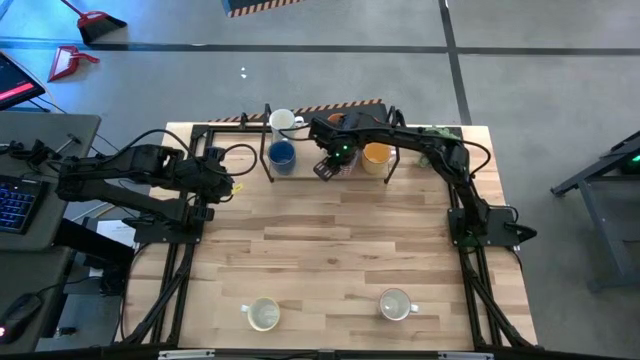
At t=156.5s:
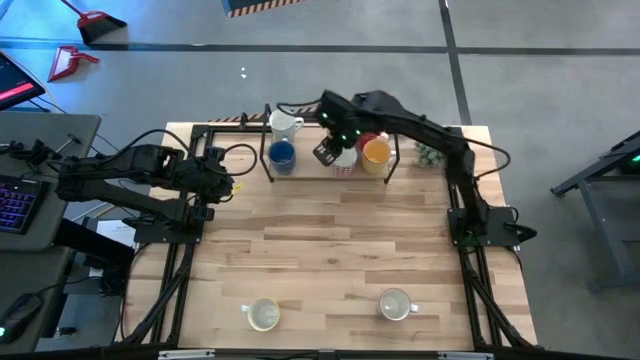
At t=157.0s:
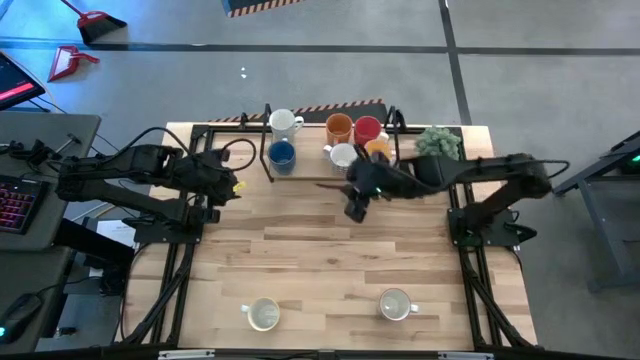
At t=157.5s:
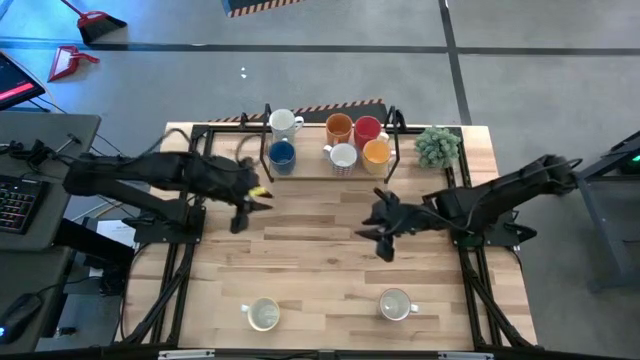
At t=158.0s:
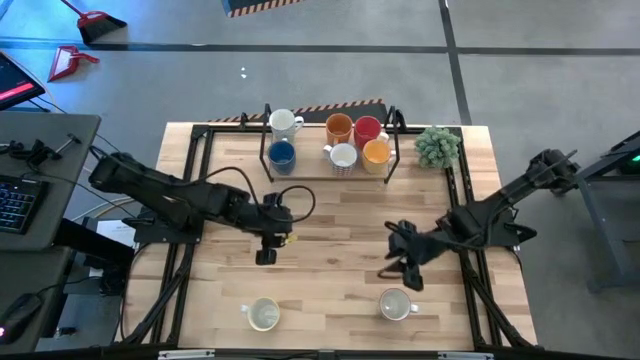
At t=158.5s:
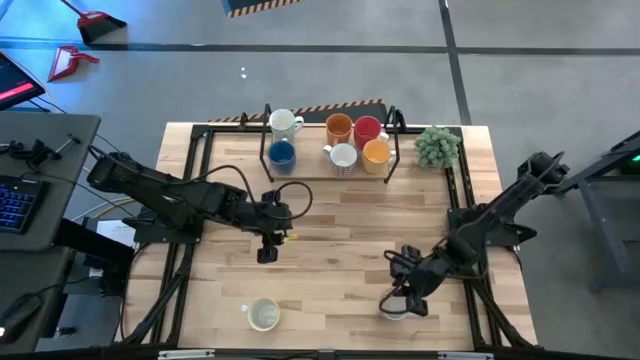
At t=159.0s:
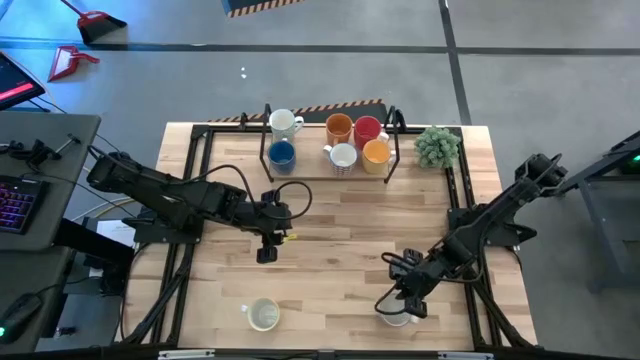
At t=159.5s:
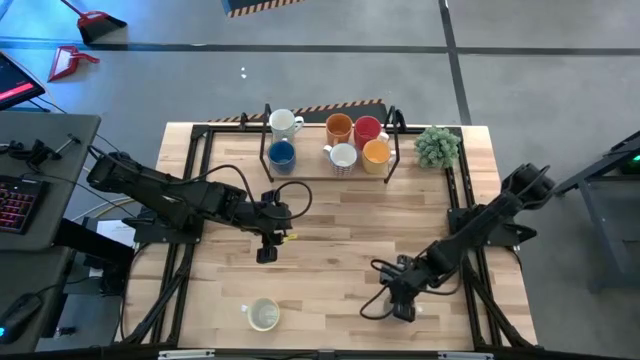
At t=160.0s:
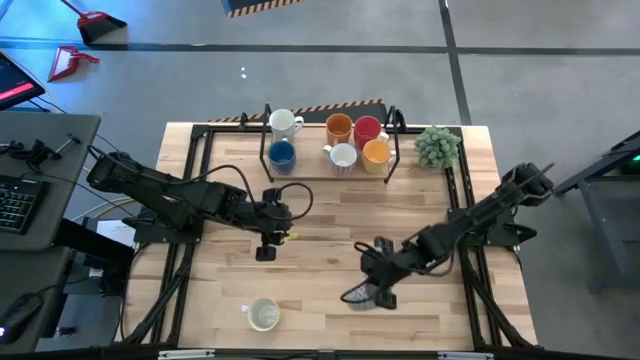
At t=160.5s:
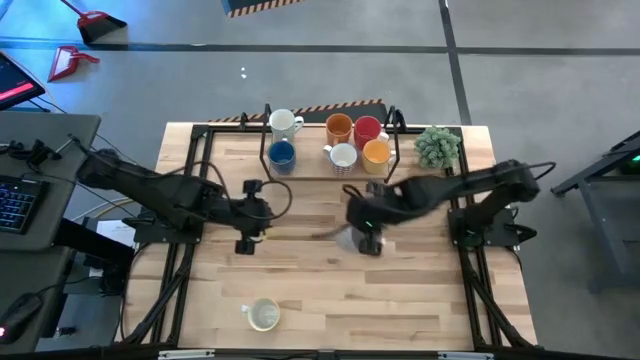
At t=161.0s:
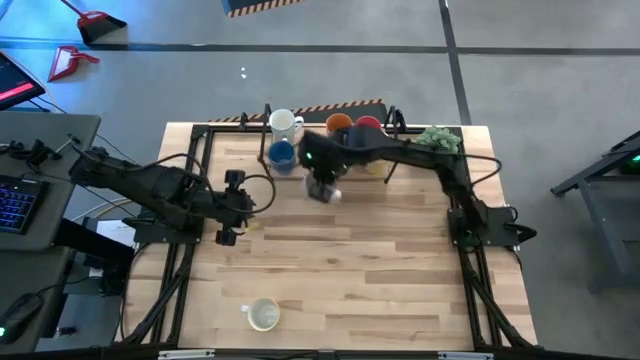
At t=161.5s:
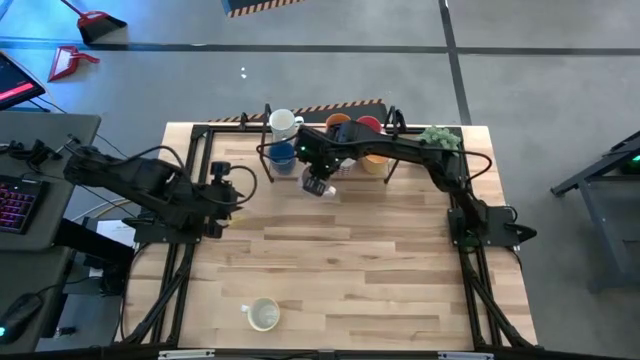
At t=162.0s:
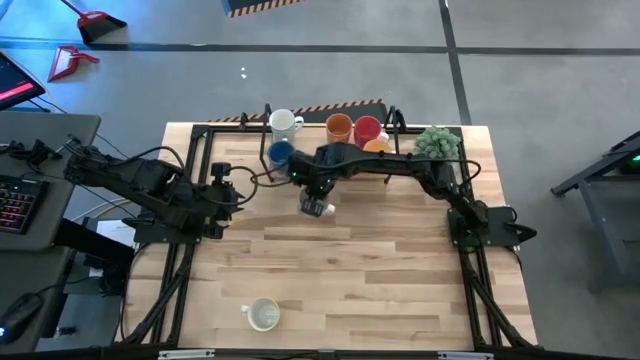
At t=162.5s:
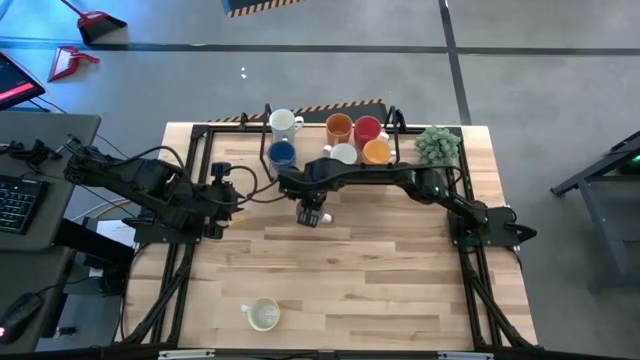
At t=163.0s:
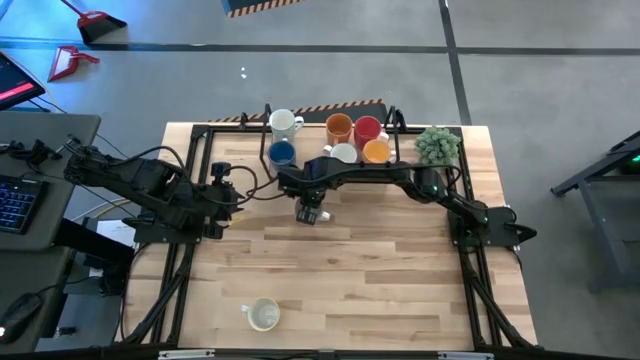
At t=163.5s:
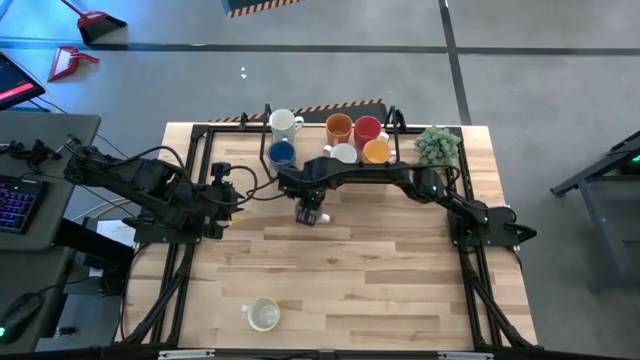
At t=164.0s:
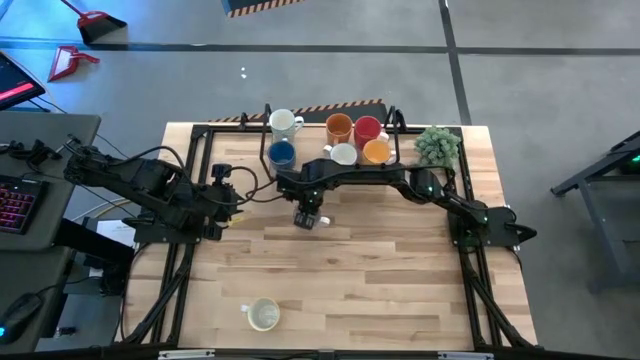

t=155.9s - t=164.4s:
Task: Place coffee mugs
Move the white gray mug to the center of the table

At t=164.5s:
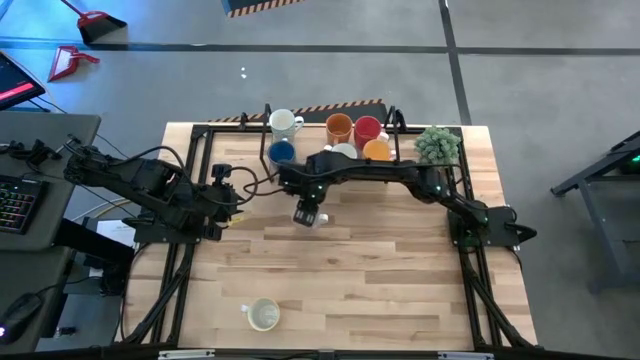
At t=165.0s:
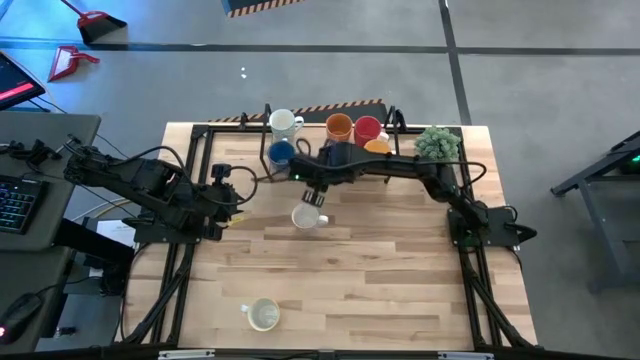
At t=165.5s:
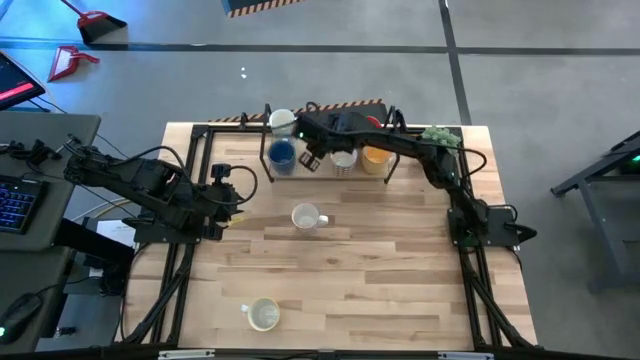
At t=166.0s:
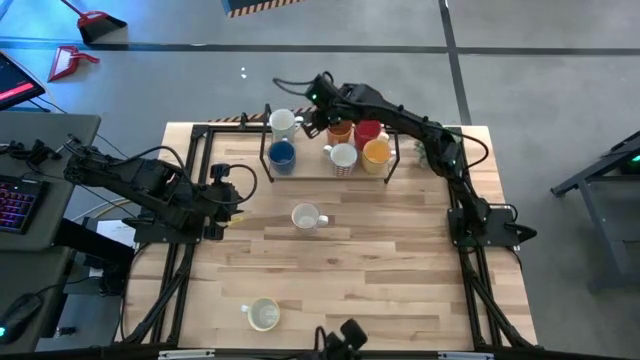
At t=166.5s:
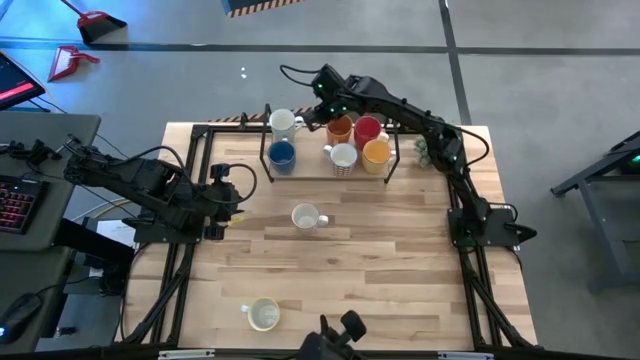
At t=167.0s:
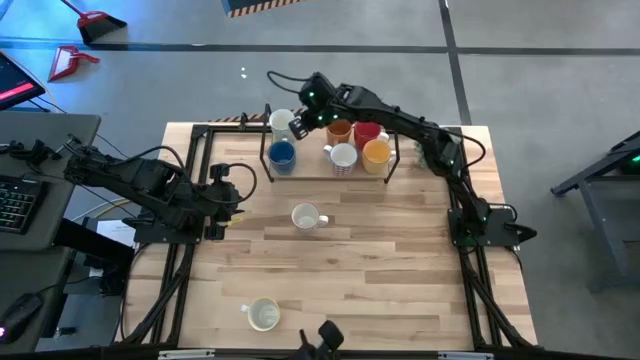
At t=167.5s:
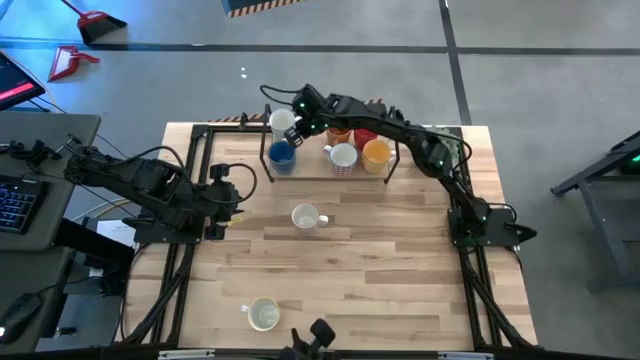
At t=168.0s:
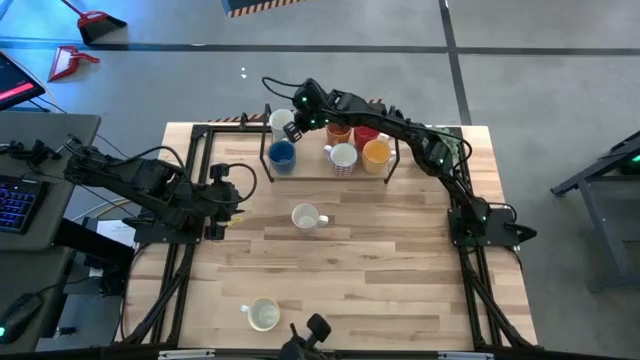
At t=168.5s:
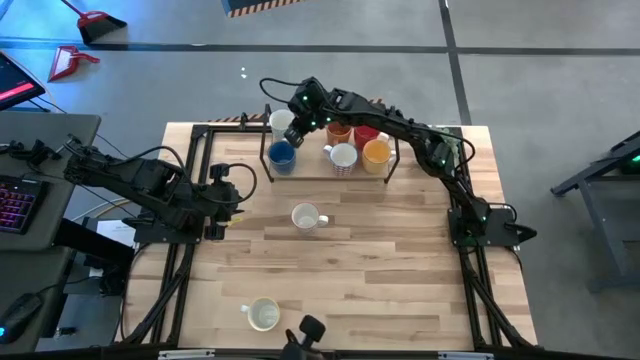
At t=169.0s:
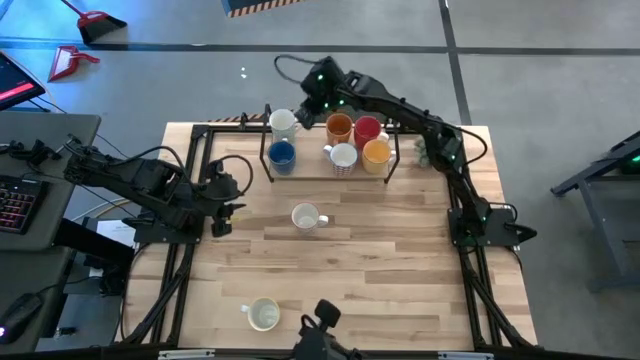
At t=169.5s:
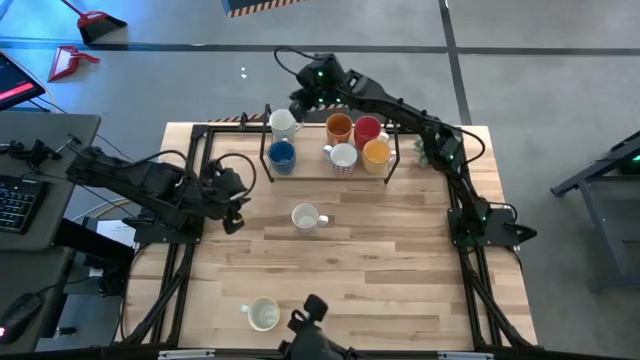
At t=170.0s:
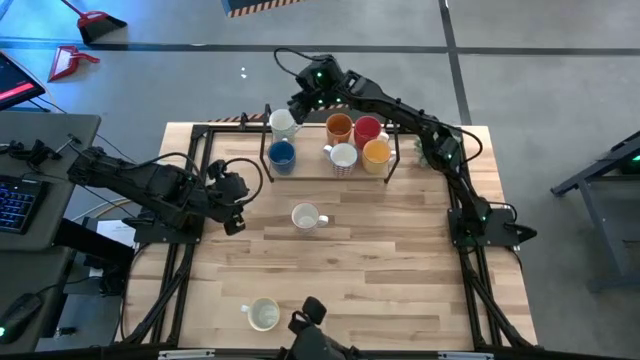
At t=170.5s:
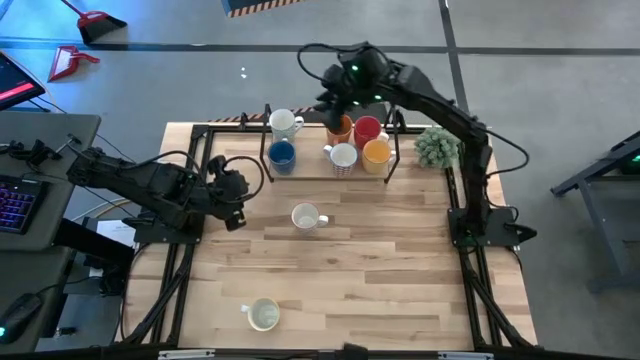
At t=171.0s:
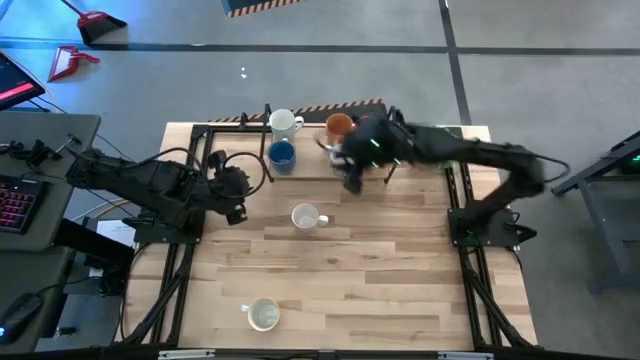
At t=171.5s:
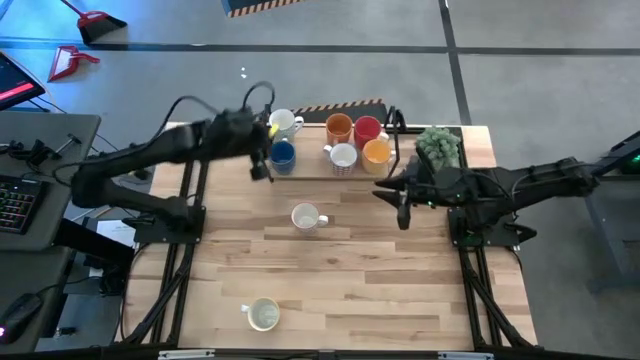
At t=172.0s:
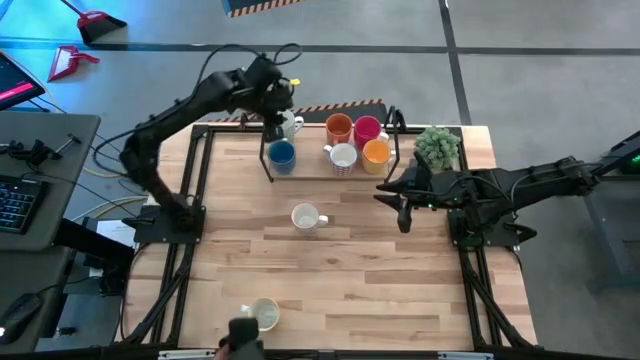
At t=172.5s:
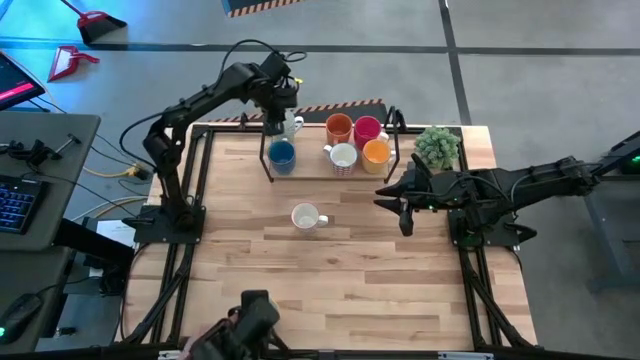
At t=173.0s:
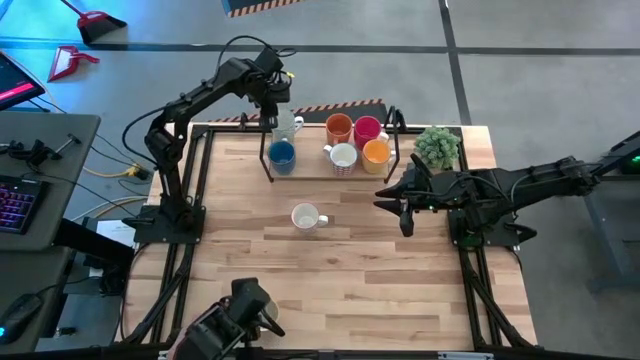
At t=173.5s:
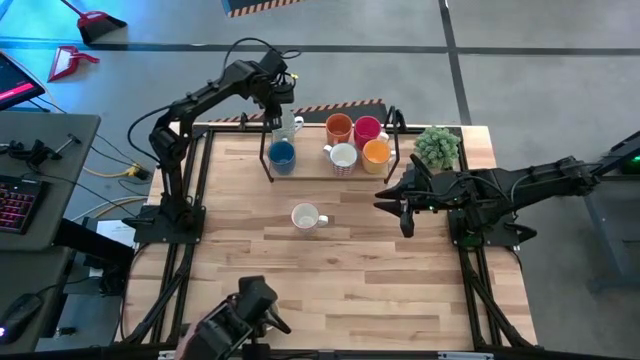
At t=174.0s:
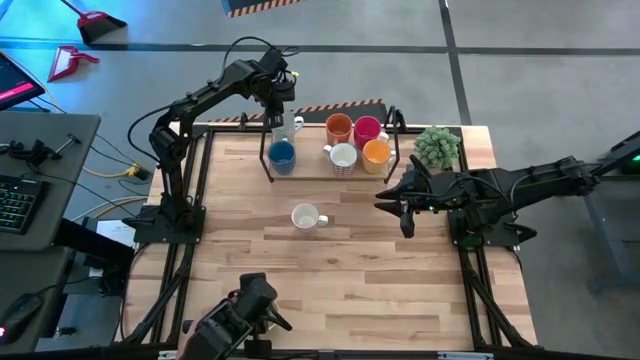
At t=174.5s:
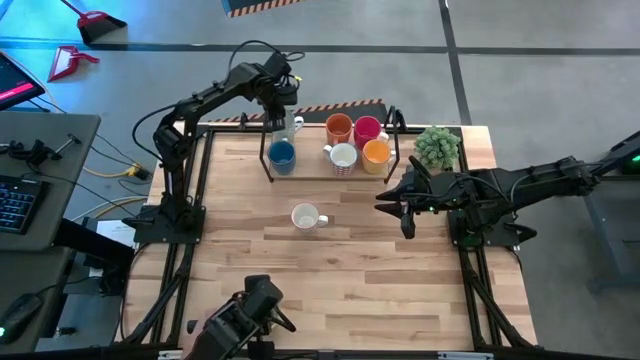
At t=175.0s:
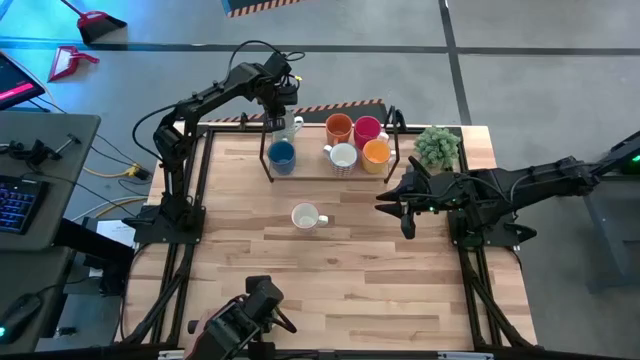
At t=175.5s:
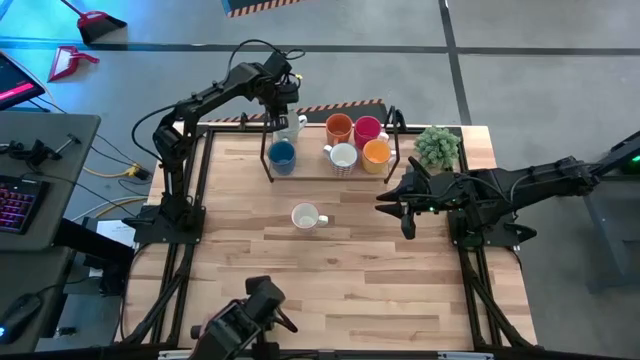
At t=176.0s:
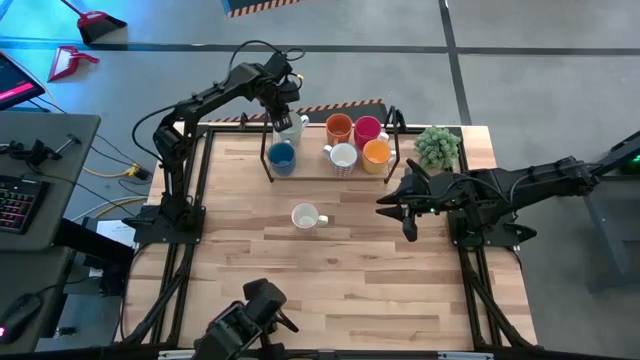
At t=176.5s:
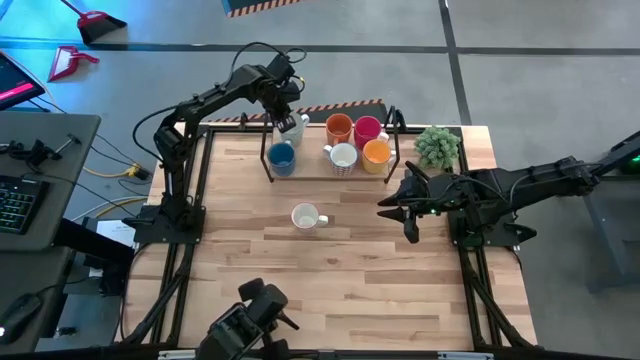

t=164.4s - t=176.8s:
Adjust the white blue mug on the shelf

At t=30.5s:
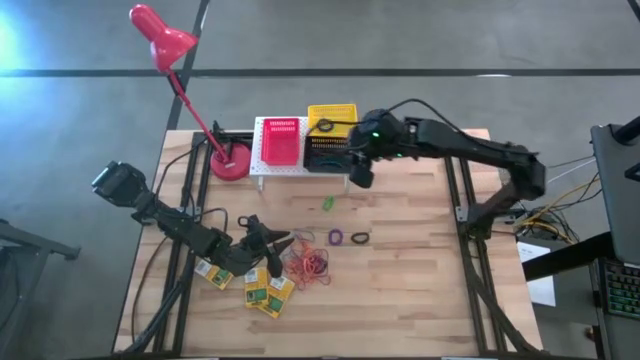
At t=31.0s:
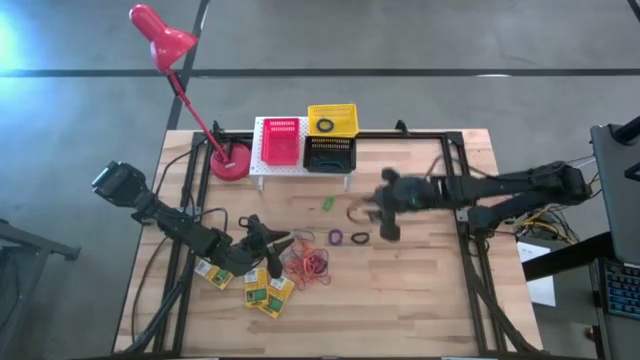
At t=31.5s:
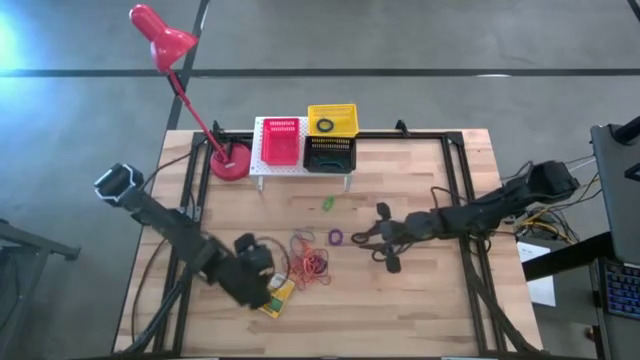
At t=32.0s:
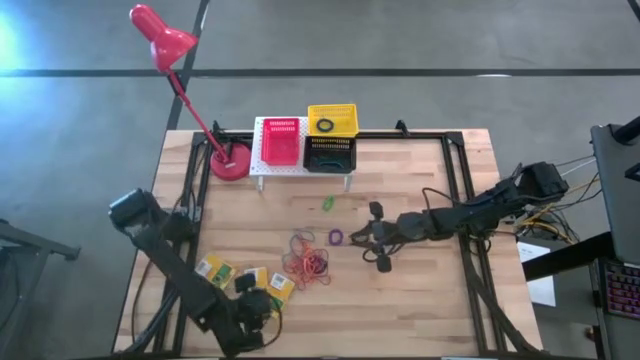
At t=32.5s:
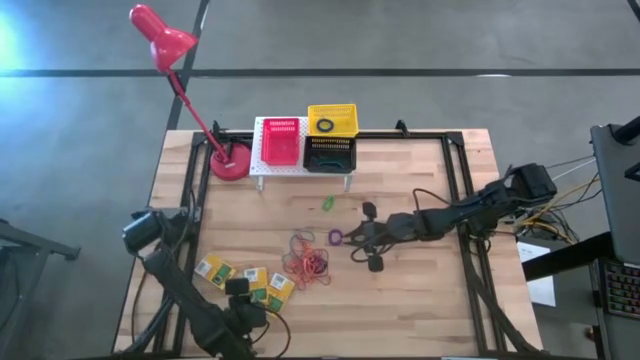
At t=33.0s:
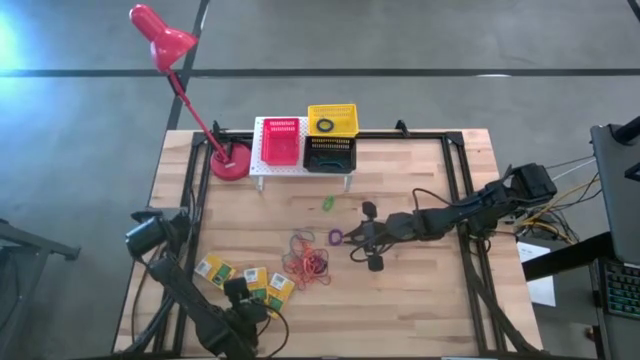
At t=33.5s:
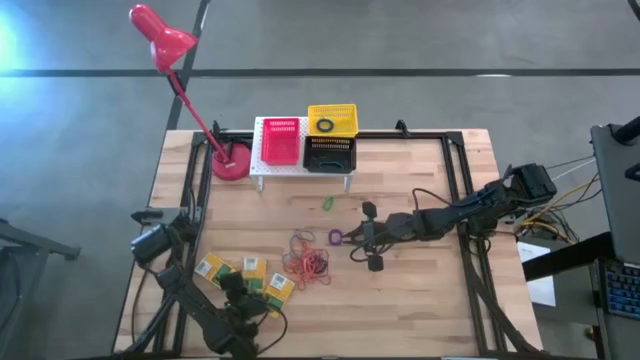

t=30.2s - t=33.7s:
Task: Pick & Place Office Desk Supplies
Put the yellow crayon box into the red bin on the shelf
